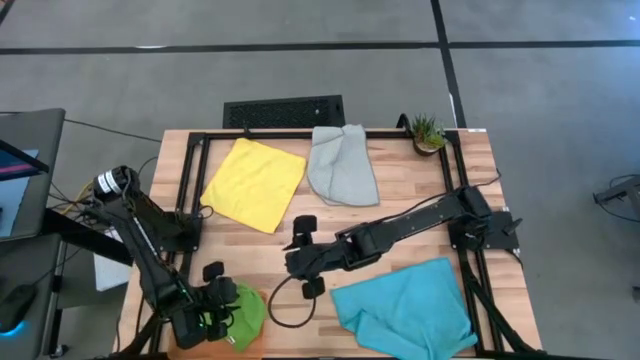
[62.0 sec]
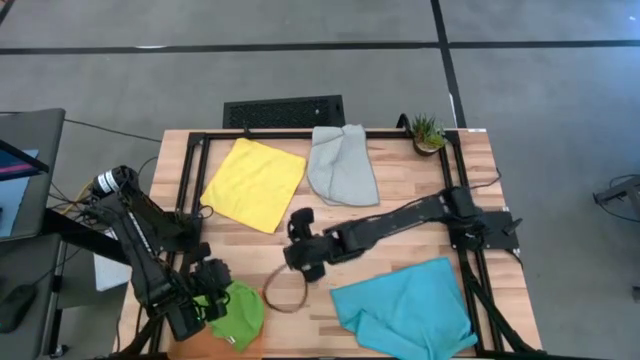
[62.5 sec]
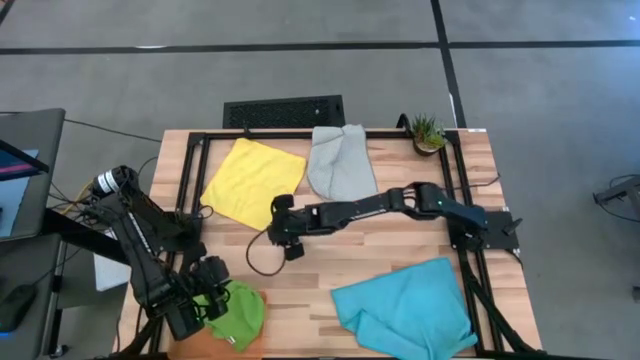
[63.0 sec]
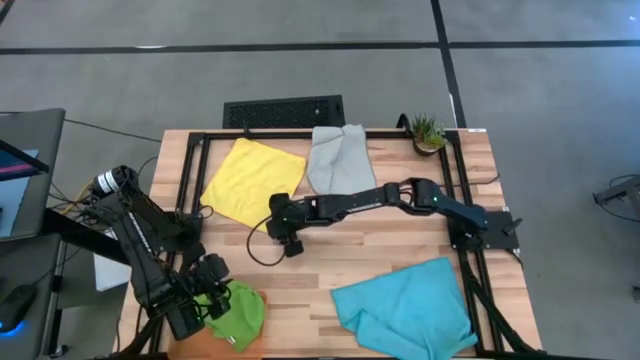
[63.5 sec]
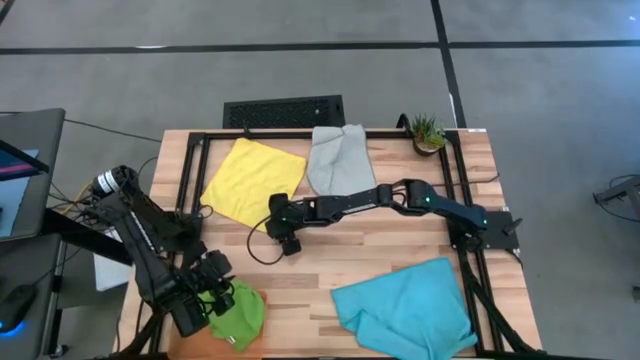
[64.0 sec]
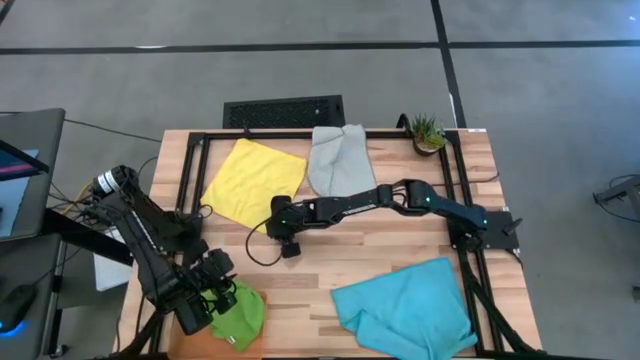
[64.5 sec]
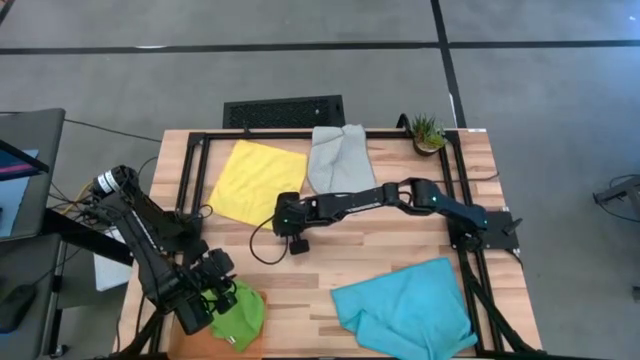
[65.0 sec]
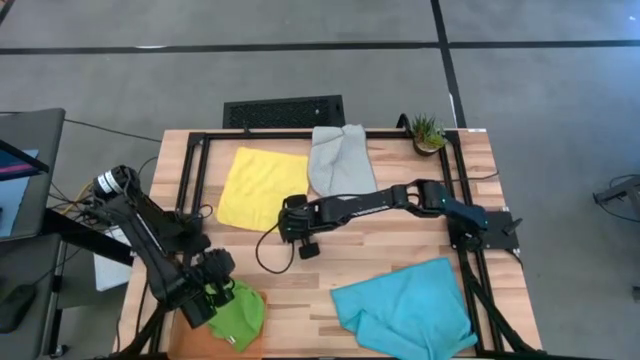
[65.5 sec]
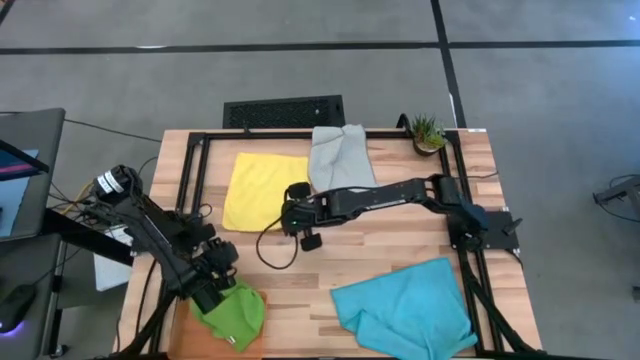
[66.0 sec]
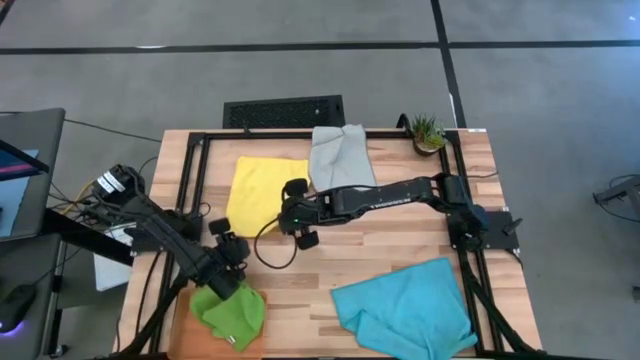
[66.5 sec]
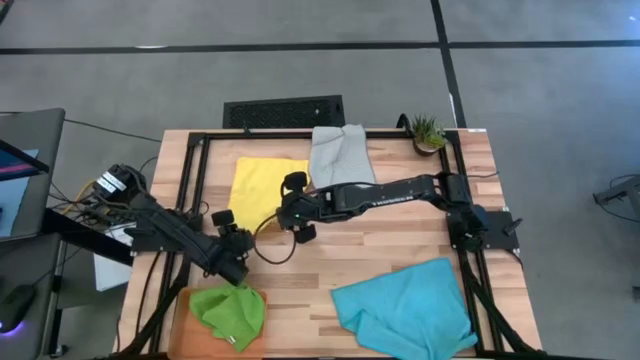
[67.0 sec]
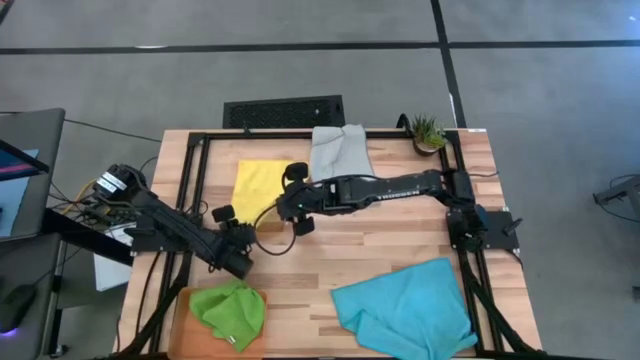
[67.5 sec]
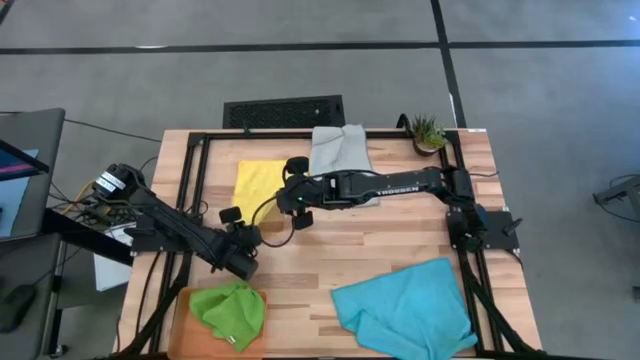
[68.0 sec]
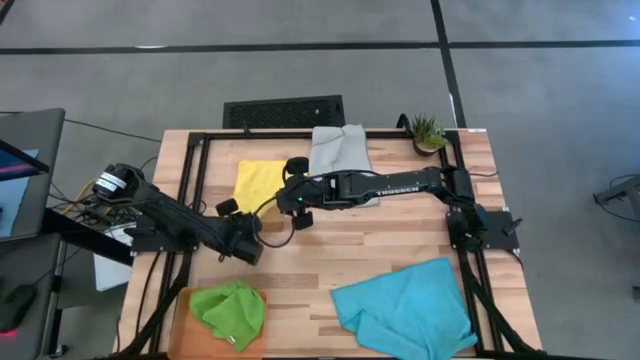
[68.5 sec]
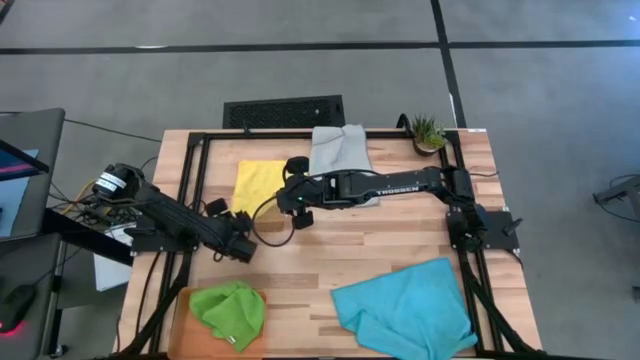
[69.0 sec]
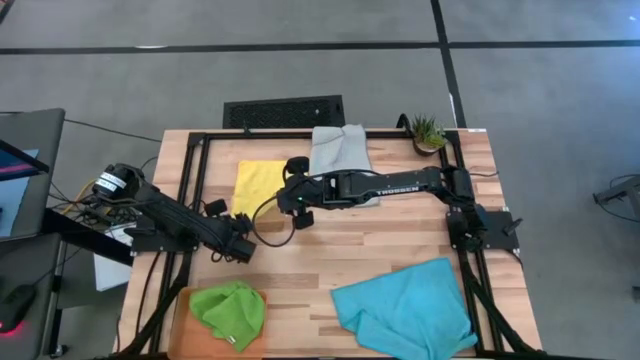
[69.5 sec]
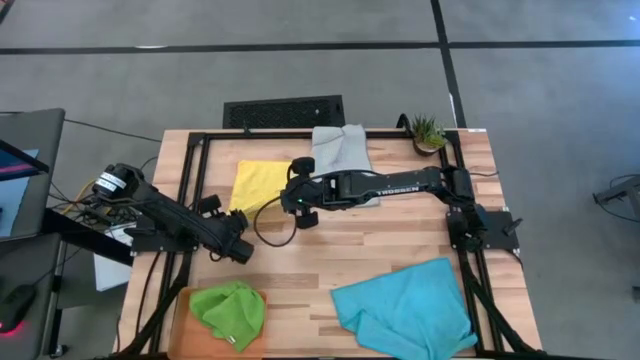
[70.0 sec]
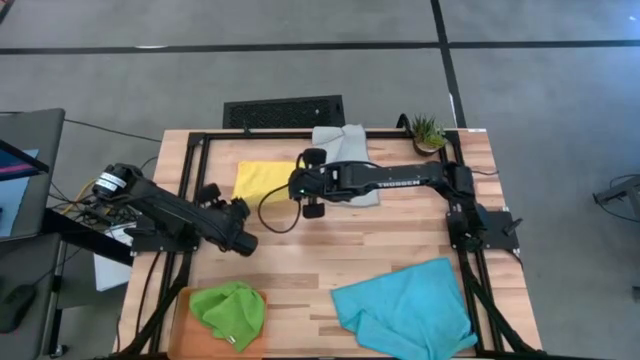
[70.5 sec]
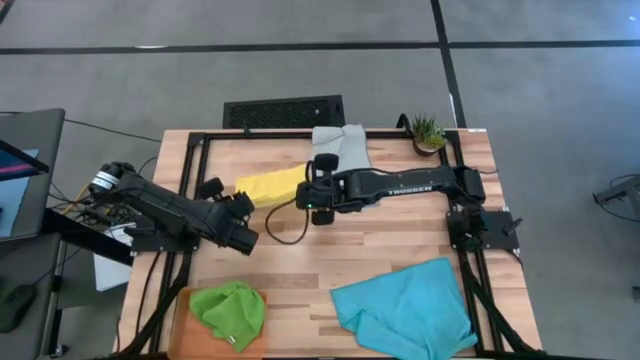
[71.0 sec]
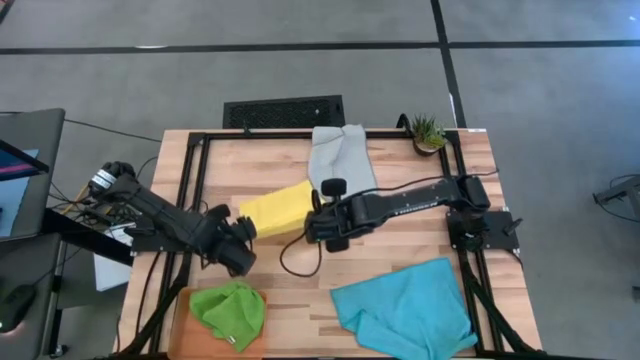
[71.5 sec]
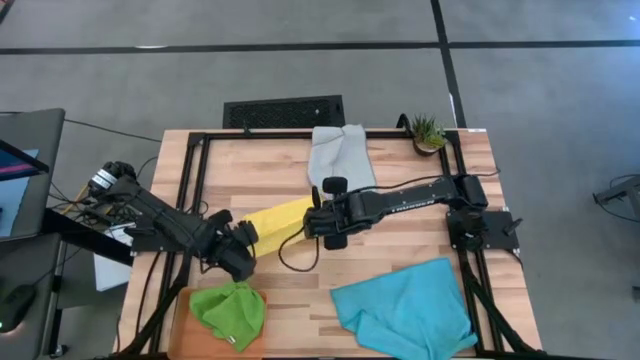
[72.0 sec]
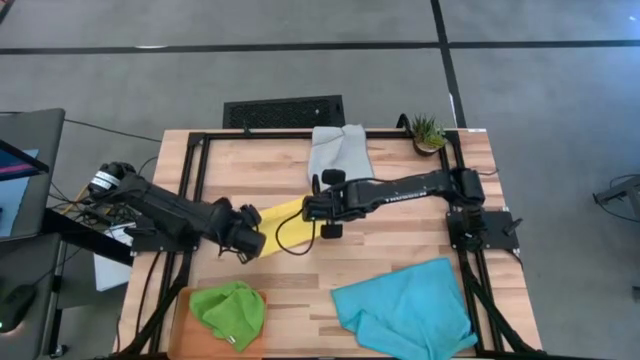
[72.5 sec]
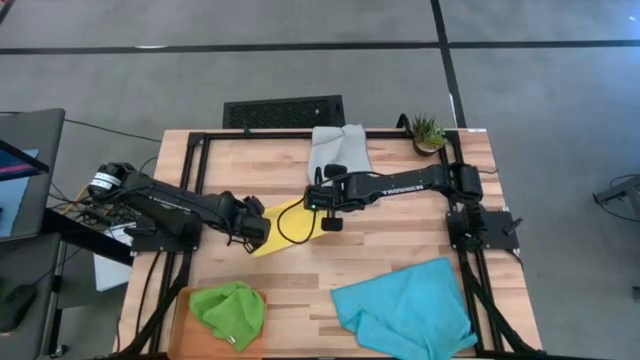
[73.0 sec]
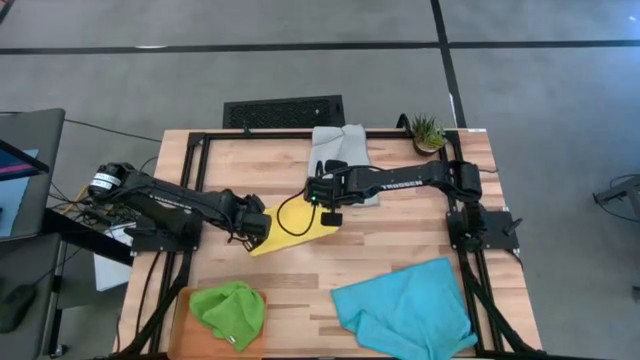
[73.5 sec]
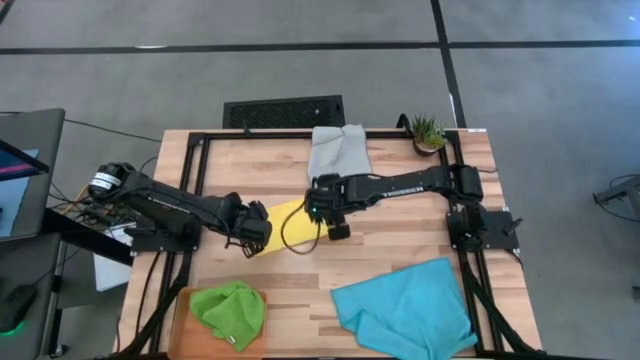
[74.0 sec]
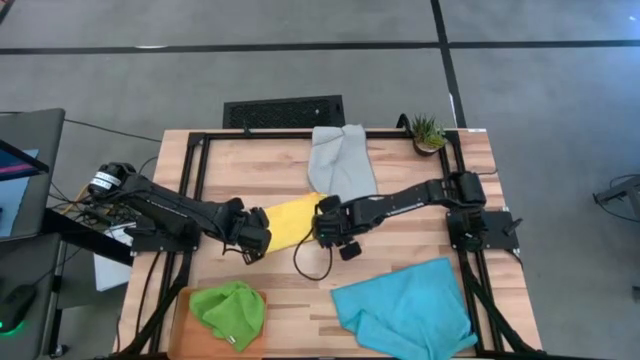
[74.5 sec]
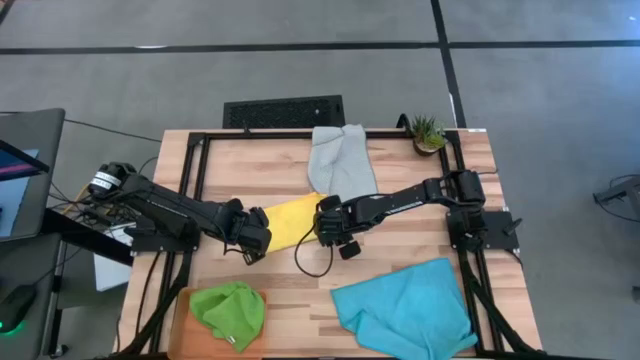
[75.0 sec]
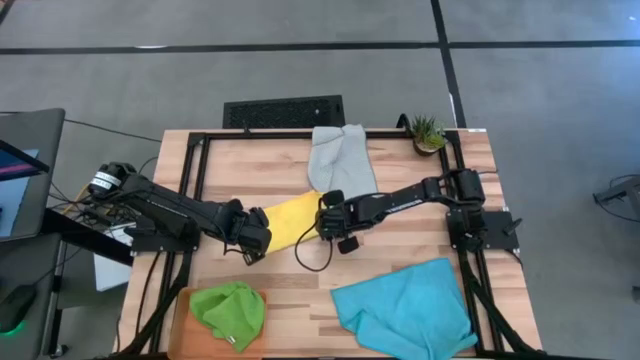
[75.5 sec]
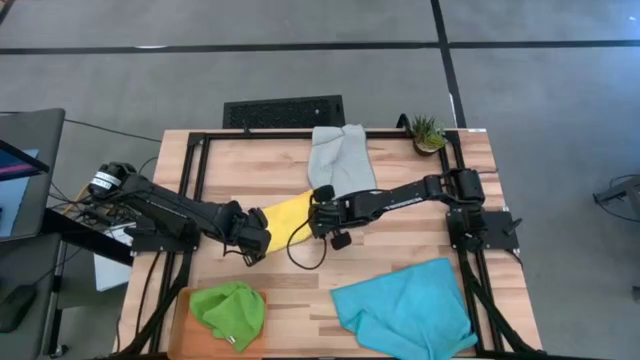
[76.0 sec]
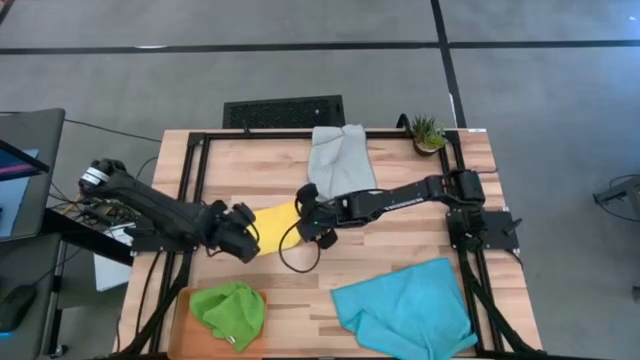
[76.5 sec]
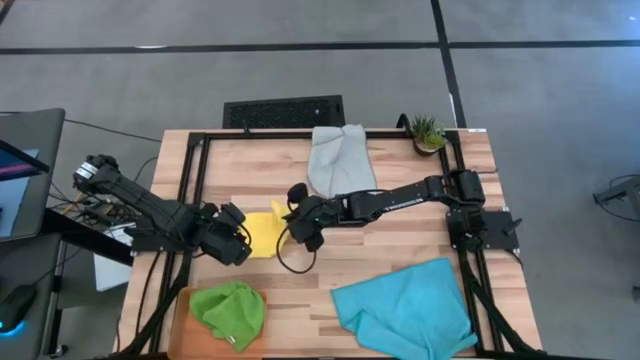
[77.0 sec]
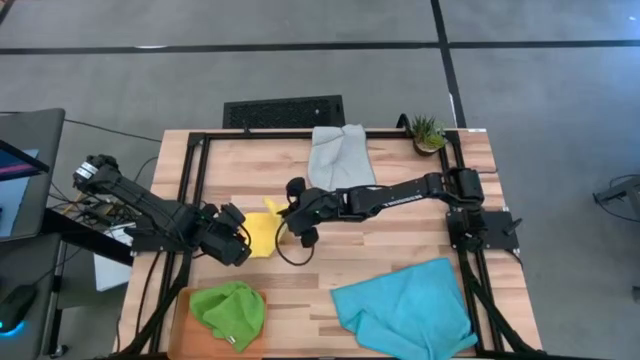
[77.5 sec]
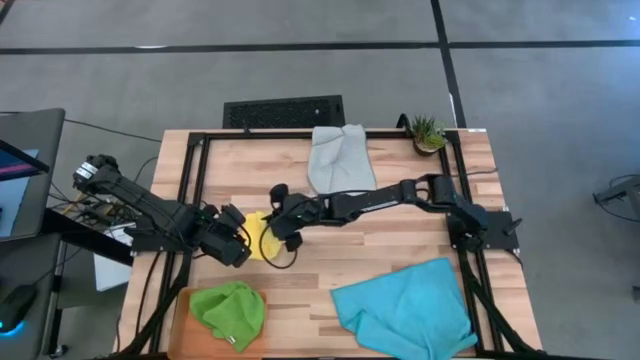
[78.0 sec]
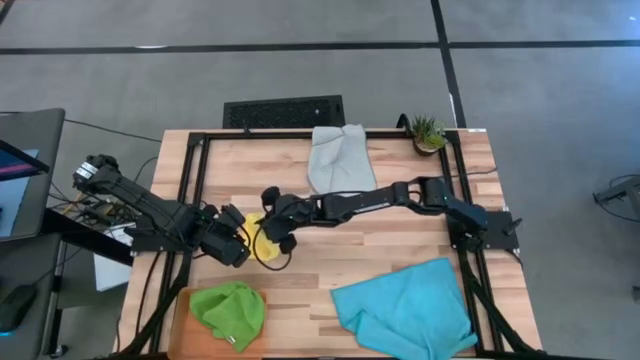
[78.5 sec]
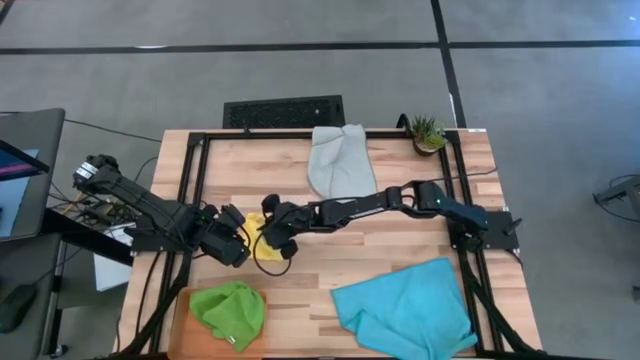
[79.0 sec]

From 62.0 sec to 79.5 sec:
Task: Fold microfiber towels
Fold the yellow towel

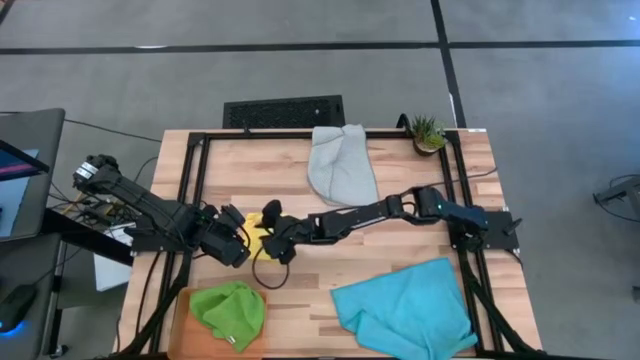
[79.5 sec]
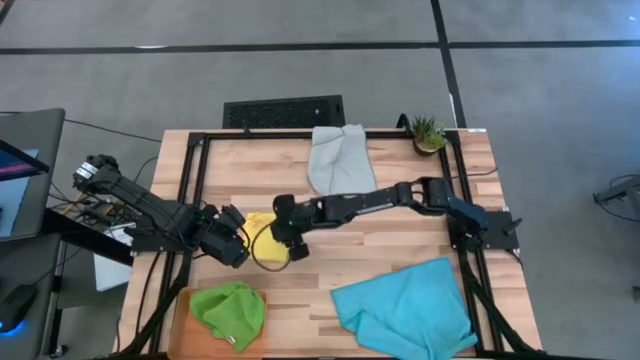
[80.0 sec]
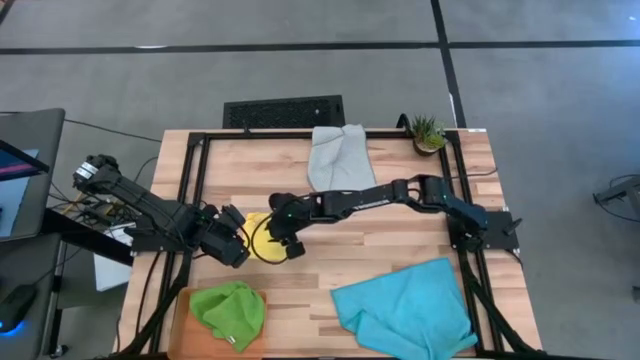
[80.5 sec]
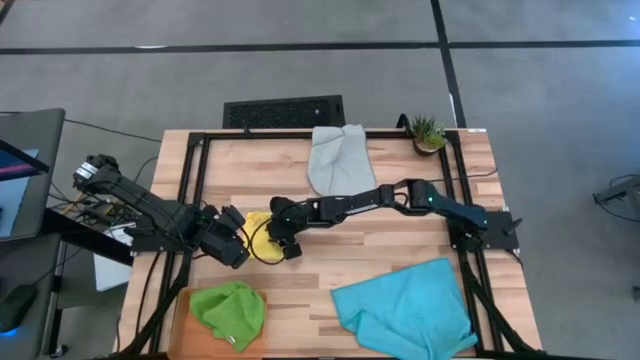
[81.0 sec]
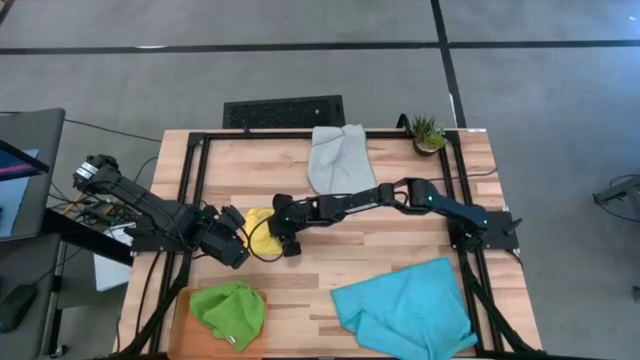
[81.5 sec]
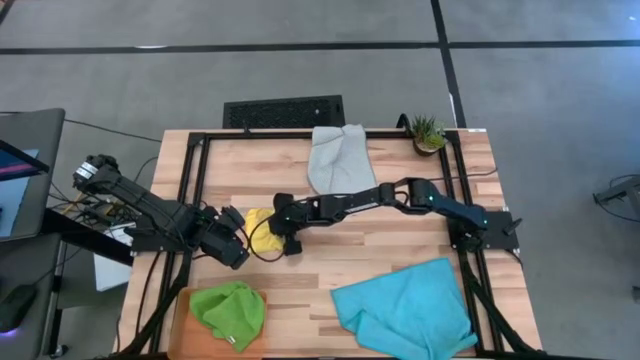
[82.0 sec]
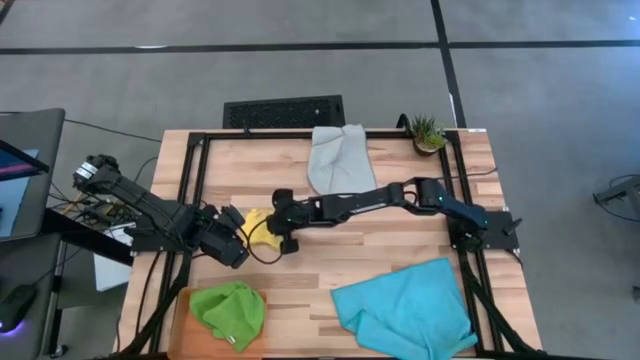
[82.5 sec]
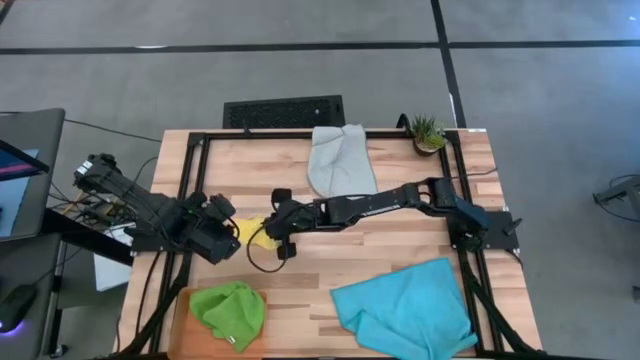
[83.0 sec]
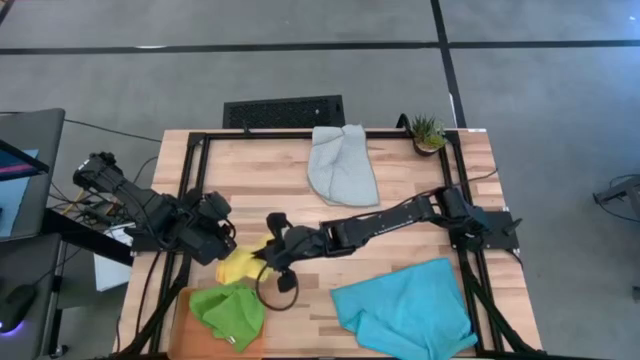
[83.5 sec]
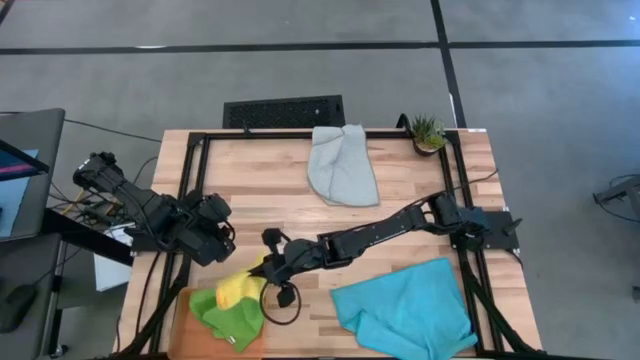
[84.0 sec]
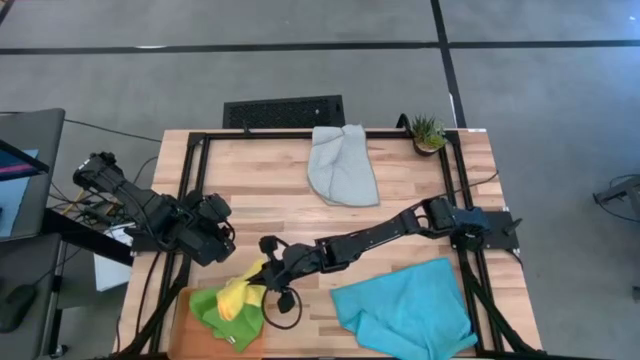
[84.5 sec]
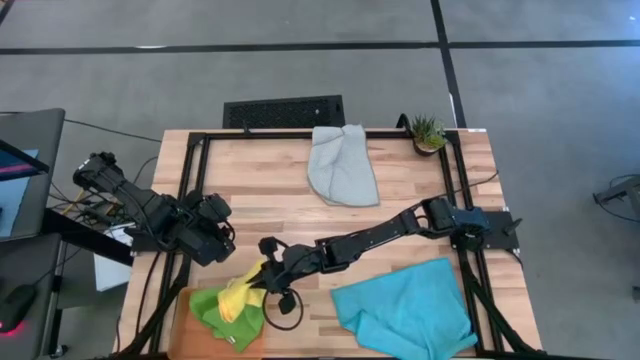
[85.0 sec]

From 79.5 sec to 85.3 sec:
Put the folded yellow towel into the orange bin
